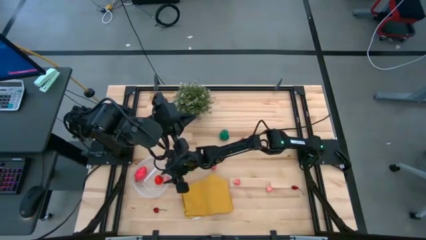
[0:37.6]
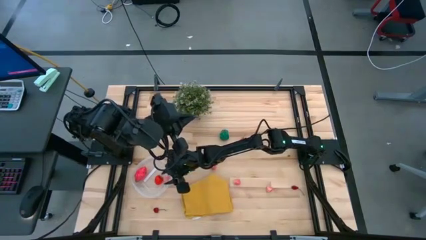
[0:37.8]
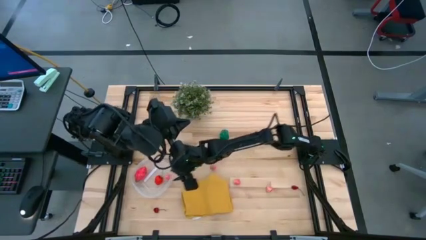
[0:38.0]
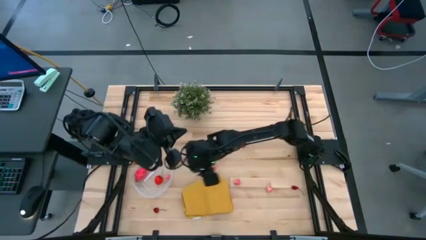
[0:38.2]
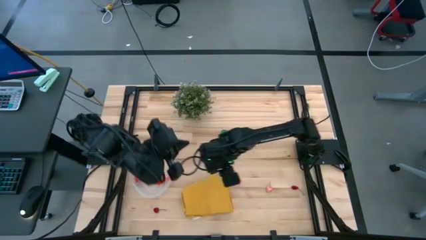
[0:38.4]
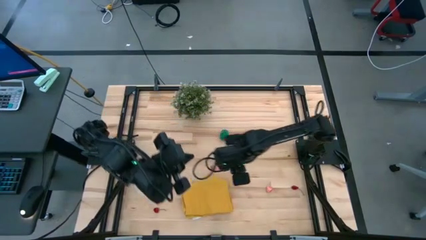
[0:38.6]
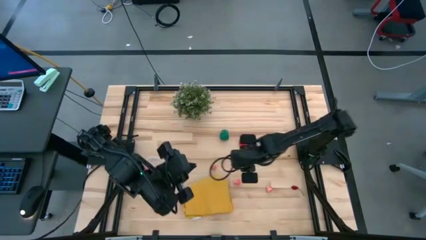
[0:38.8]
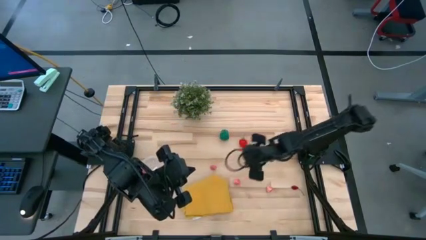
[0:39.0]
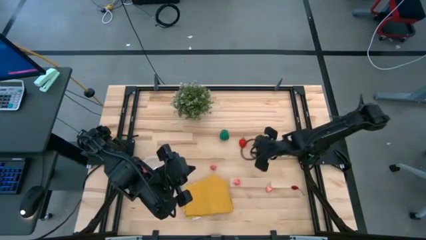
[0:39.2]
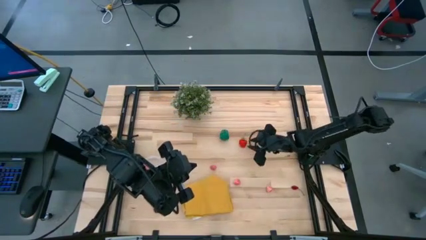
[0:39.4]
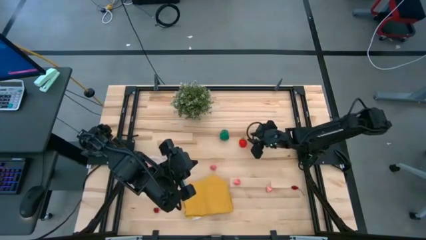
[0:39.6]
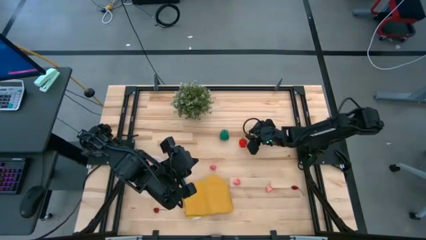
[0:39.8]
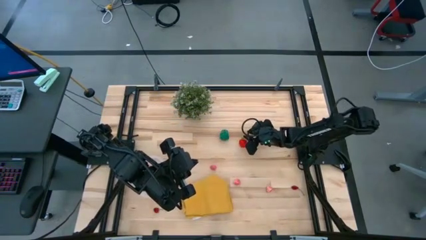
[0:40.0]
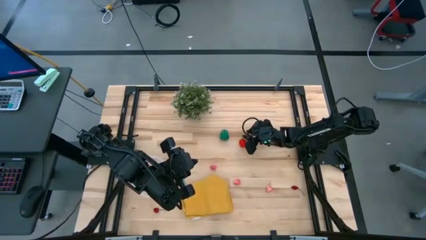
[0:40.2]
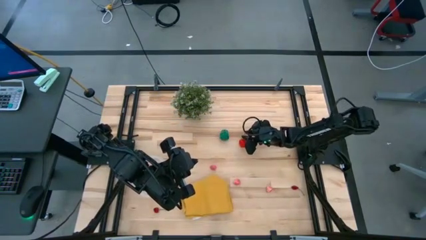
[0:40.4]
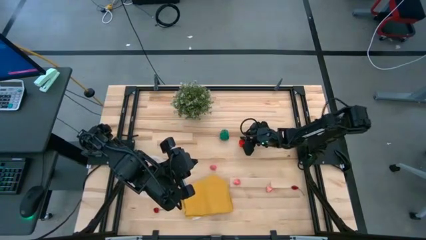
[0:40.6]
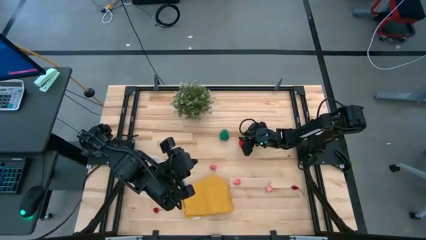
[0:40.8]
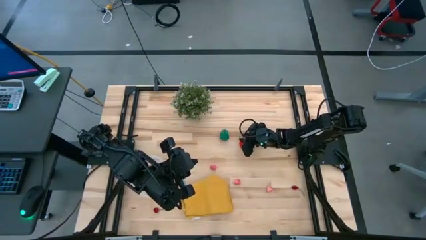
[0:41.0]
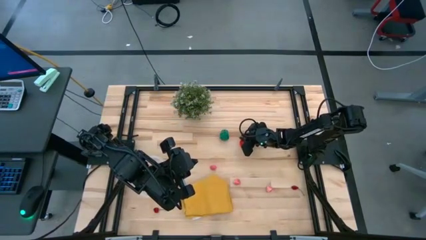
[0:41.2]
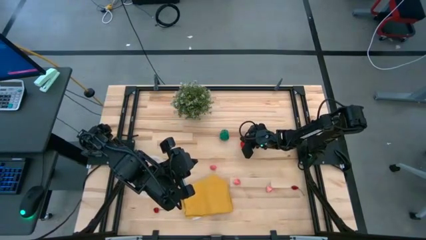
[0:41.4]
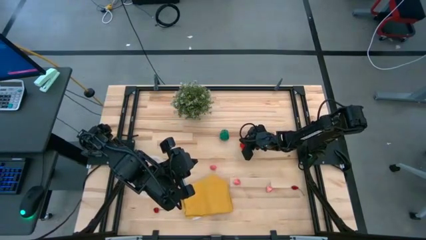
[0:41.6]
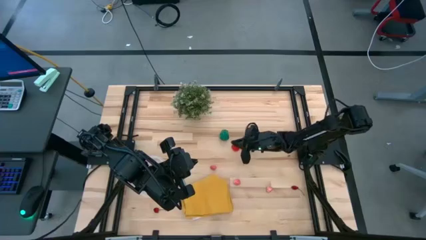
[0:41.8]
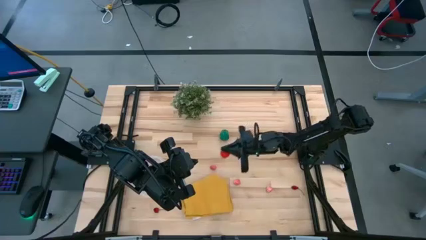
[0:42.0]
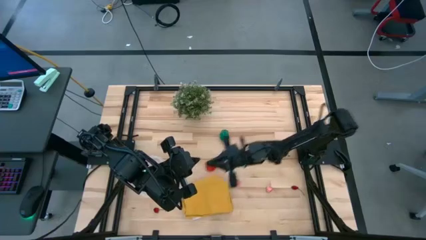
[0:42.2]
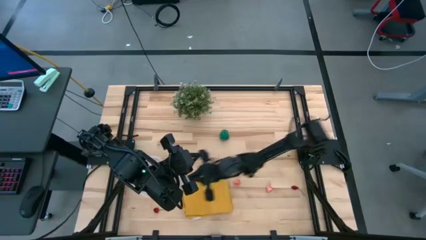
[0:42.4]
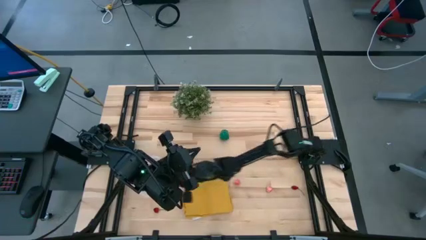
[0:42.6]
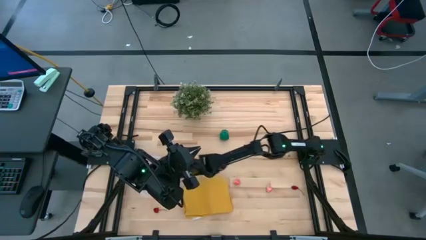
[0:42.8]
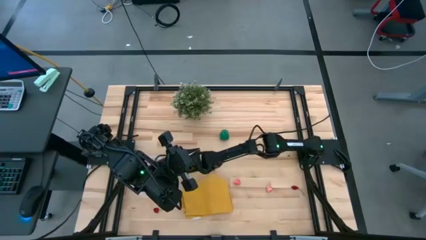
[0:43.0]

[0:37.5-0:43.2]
Task: Pick and placing Produce into tupperware
Put the strawberry into the transparent bin

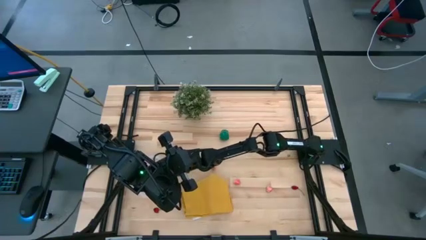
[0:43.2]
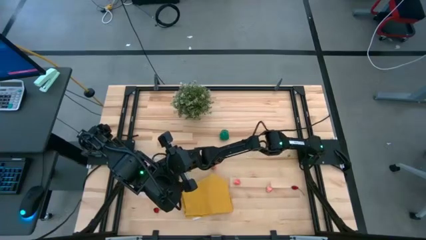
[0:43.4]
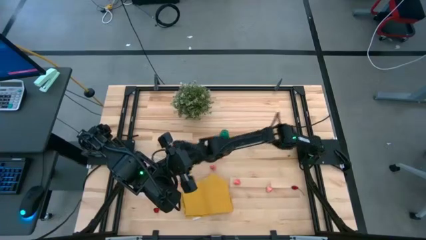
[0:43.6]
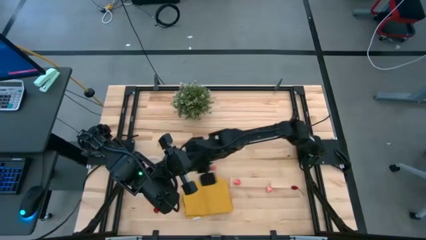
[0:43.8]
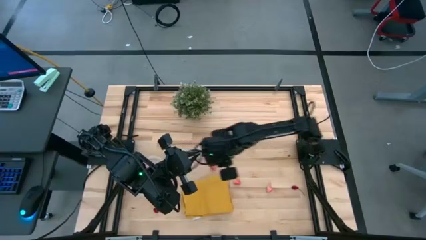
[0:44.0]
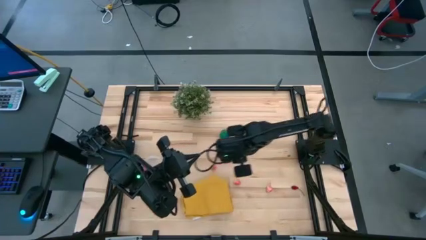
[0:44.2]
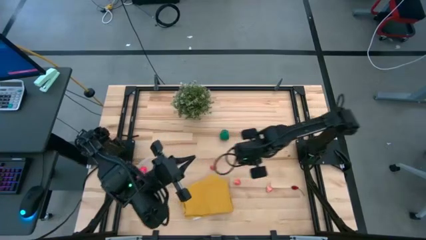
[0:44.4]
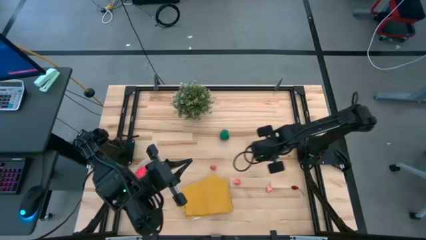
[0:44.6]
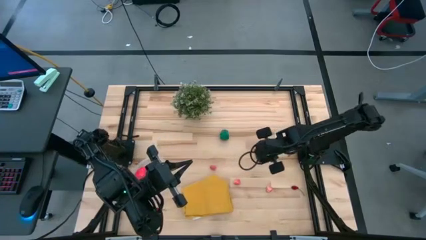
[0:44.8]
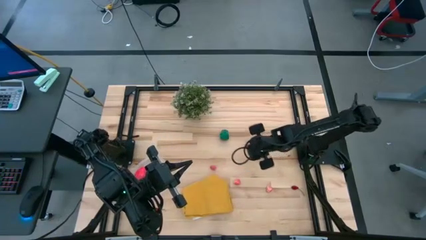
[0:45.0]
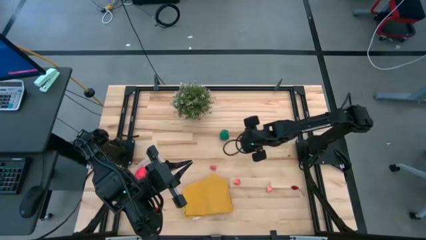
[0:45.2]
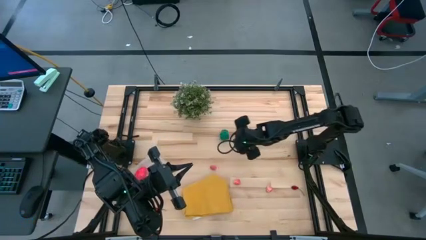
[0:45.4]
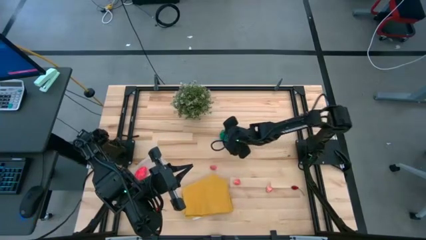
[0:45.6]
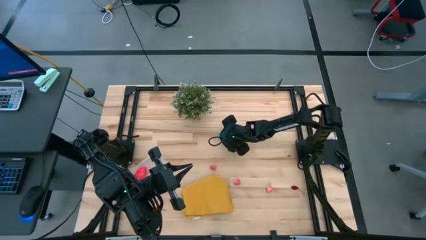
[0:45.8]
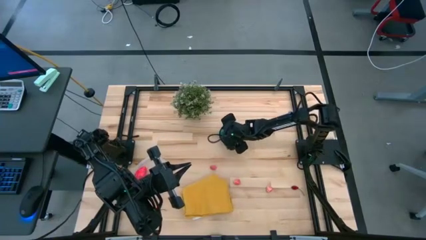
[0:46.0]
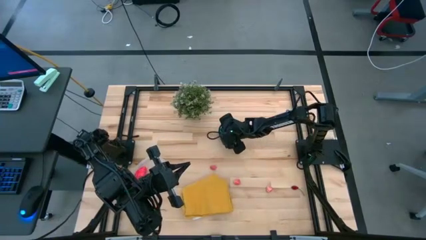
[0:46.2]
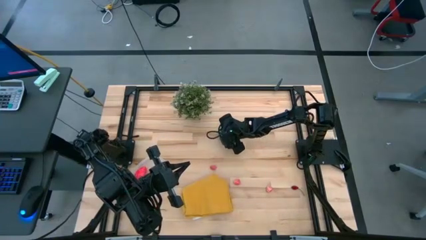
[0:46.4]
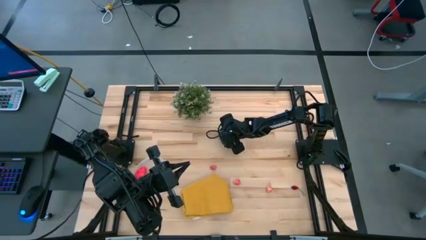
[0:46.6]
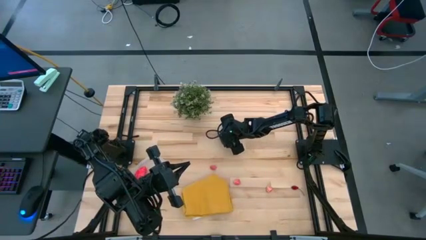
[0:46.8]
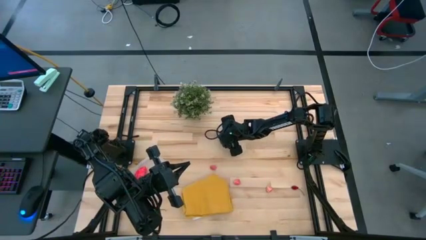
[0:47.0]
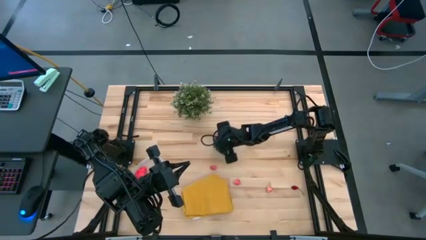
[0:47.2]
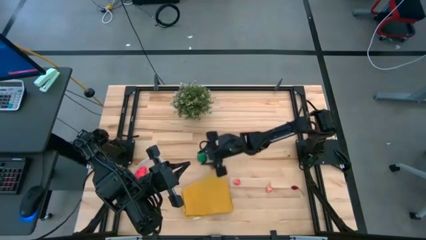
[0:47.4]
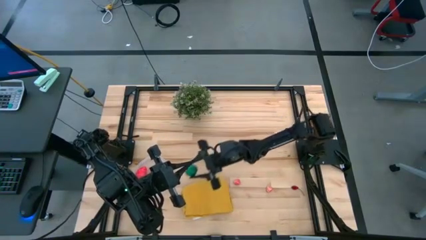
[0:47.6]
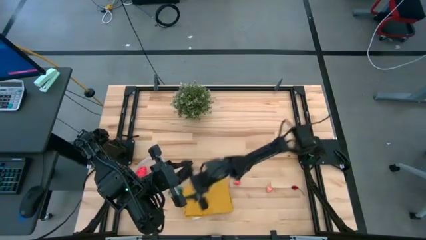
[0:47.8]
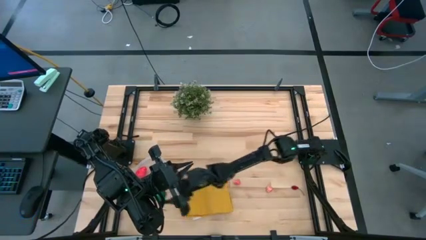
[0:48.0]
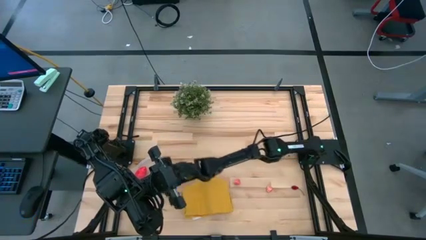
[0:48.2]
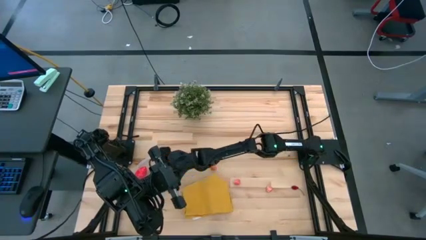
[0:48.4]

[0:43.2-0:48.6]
Put the bell pepper into the transparent bin

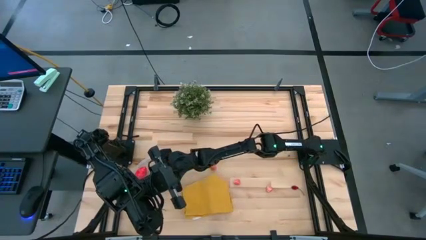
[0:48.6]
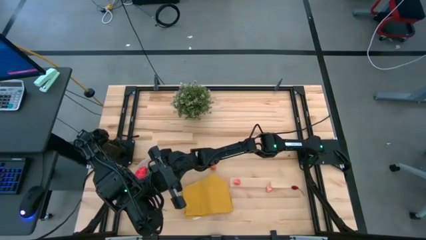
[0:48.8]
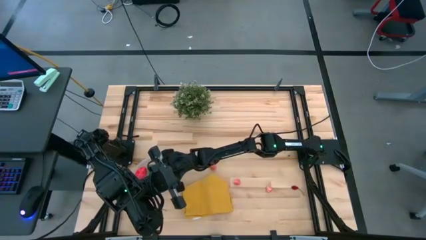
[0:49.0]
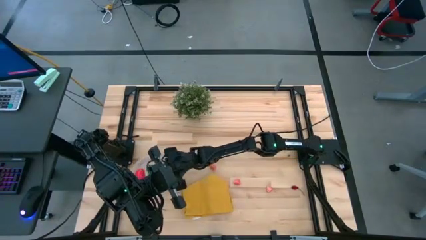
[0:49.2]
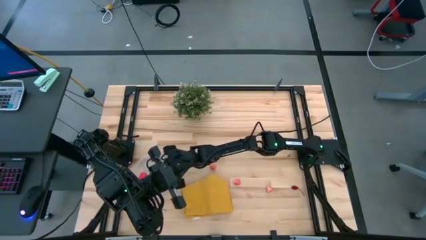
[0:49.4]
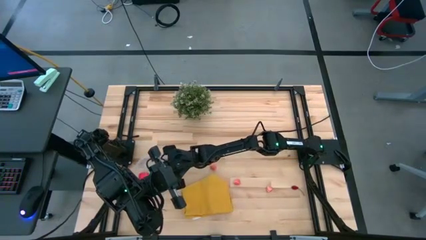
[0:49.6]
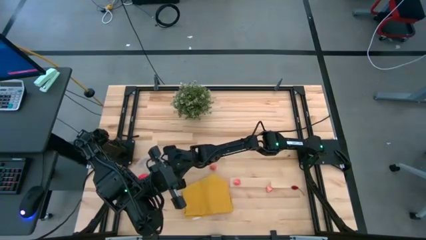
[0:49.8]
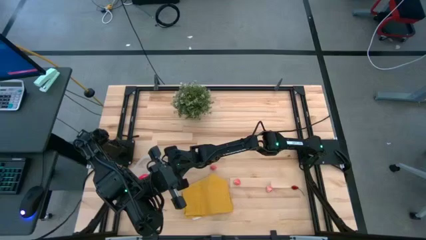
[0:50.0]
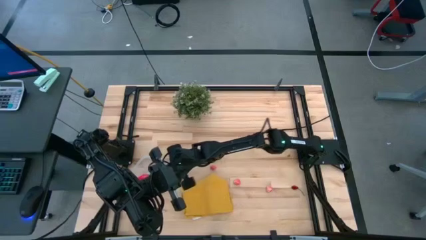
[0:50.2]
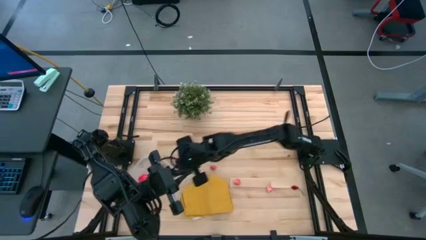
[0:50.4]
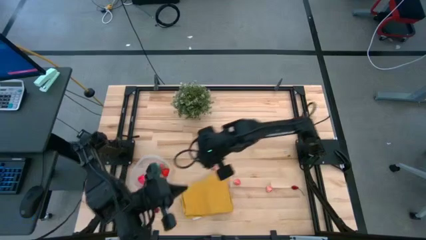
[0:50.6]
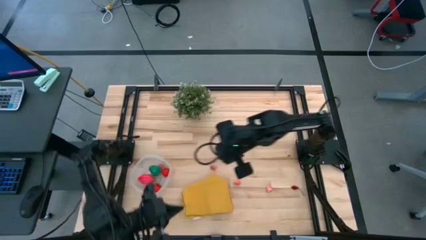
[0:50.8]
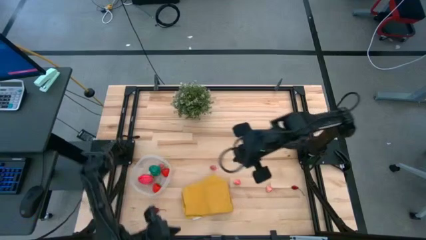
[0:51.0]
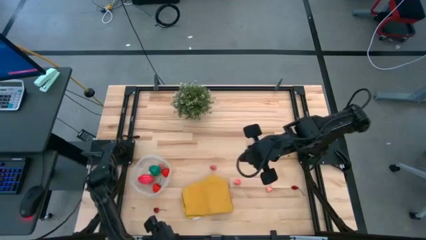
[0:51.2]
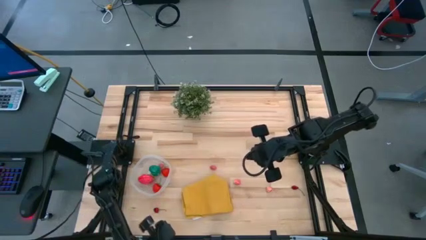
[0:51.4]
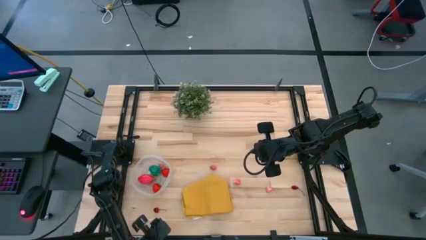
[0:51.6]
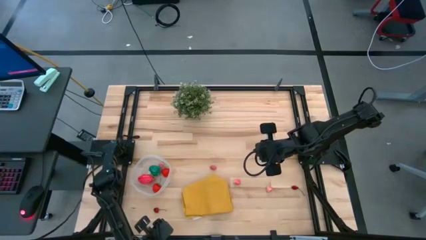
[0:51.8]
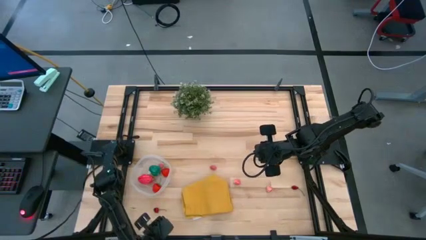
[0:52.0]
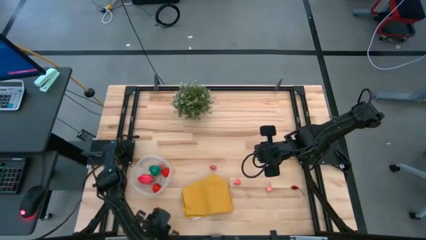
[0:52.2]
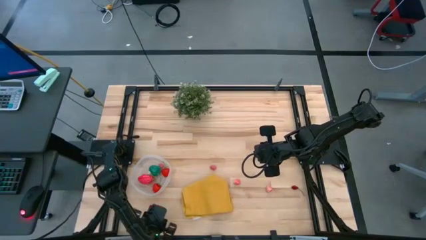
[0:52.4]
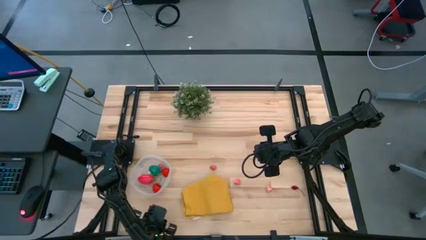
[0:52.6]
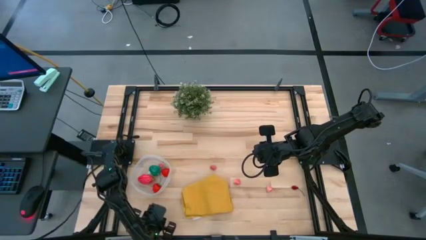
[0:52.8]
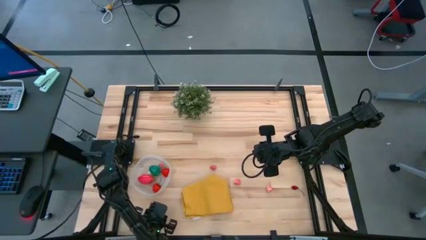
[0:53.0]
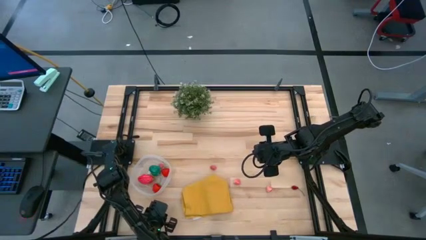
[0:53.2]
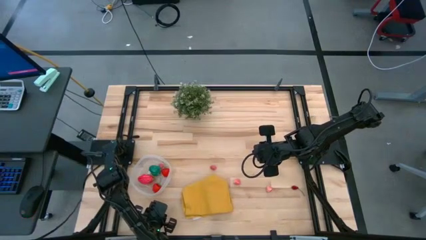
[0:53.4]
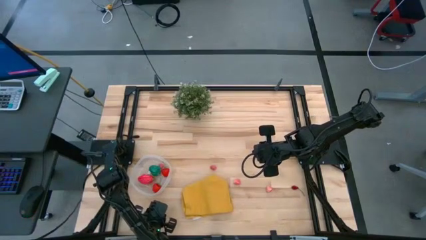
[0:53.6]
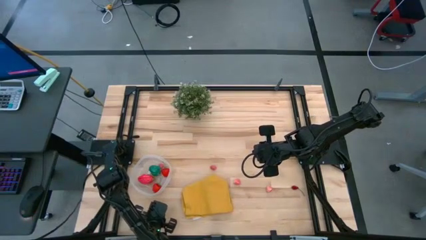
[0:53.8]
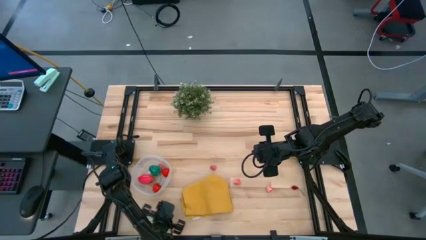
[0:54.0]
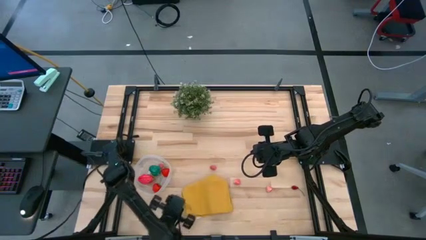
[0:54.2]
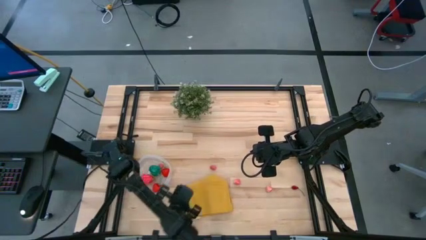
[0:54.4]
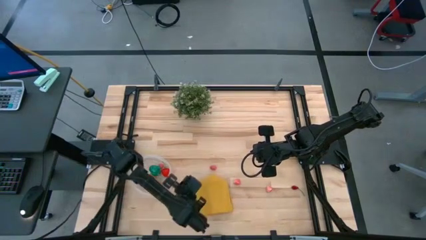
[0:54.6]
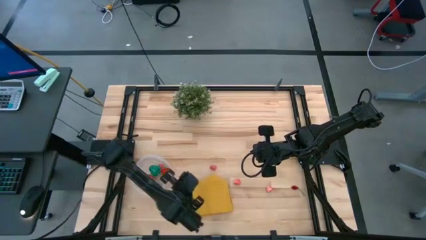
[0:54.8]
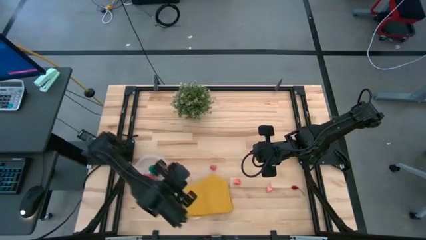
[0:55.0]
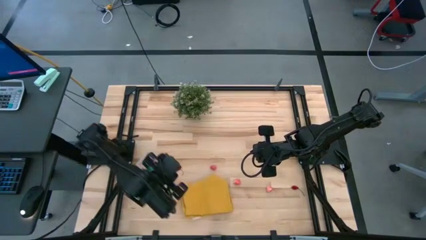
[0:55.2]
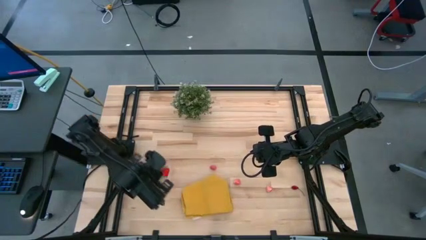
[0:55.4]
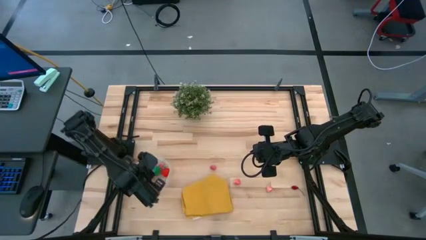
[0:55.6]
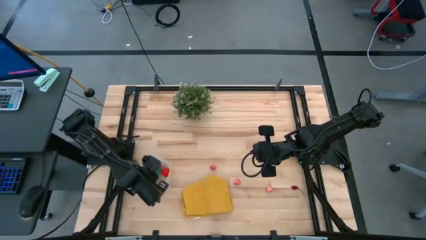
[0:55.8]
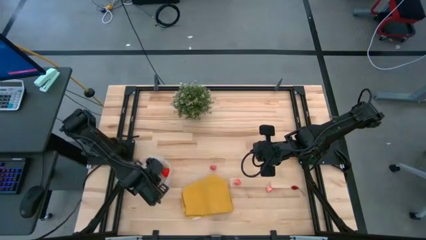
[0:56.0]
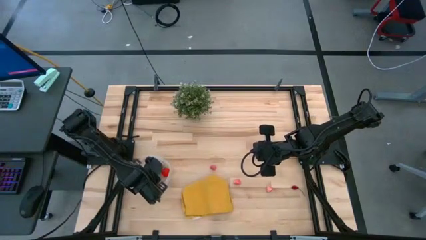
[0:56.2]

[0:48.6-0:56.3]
Put the cherry into the transparent bin
